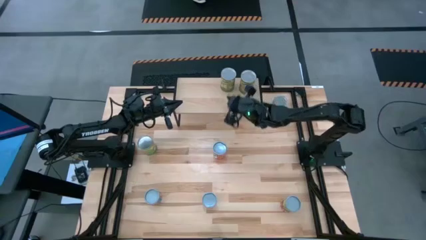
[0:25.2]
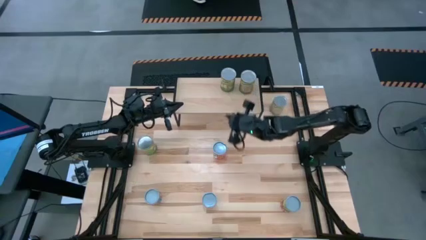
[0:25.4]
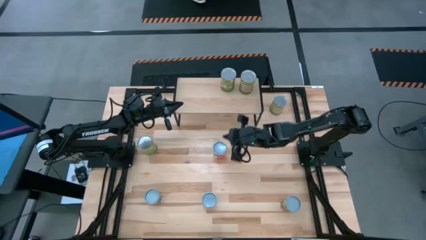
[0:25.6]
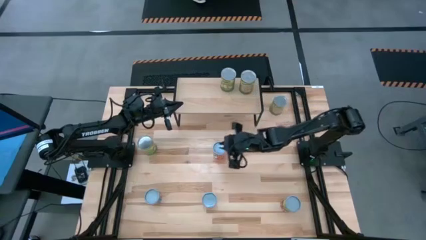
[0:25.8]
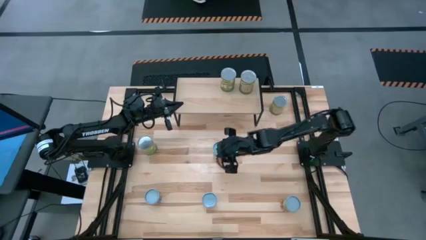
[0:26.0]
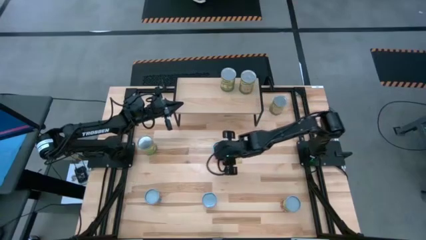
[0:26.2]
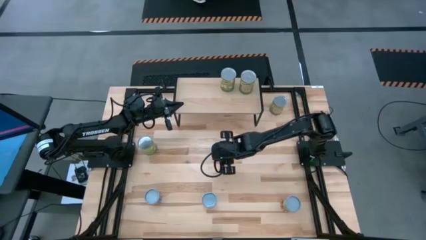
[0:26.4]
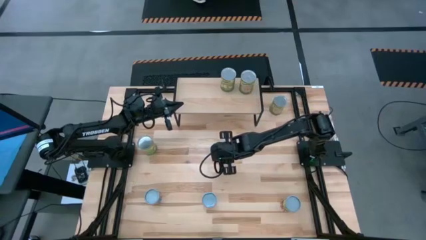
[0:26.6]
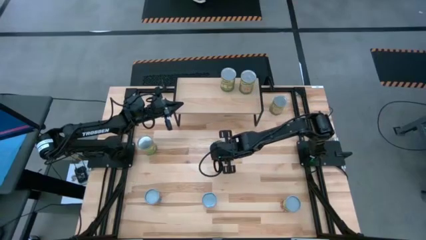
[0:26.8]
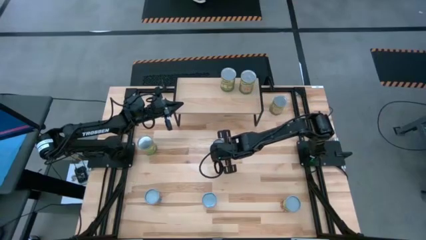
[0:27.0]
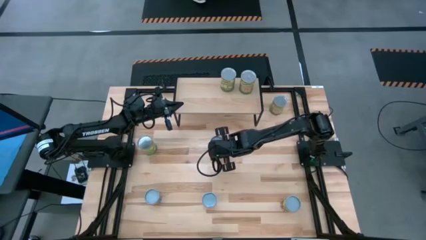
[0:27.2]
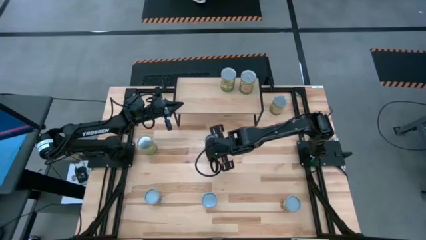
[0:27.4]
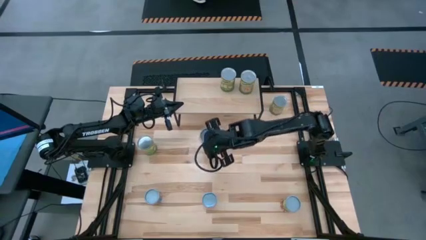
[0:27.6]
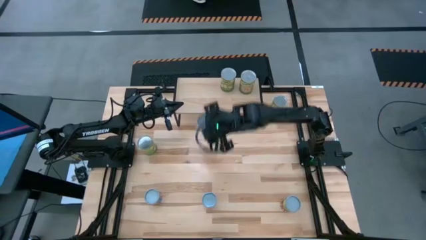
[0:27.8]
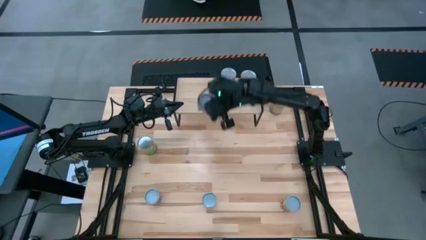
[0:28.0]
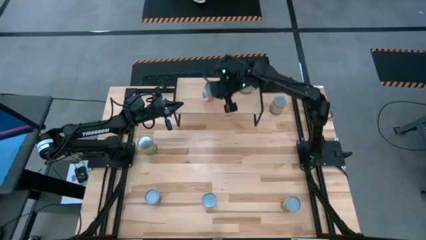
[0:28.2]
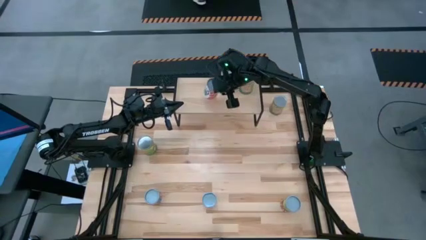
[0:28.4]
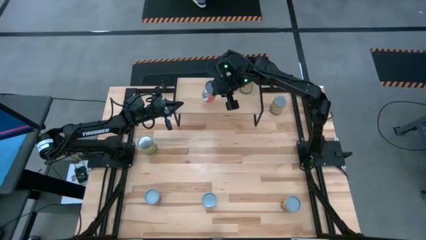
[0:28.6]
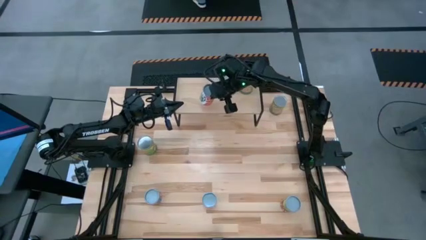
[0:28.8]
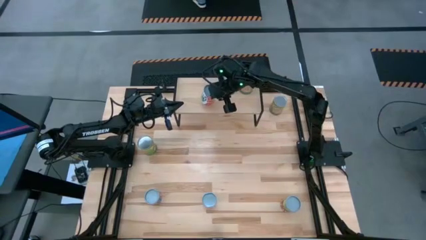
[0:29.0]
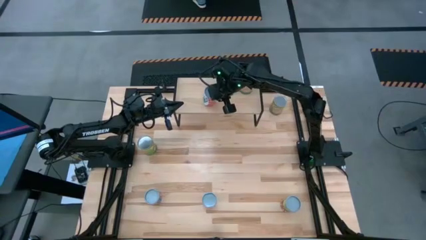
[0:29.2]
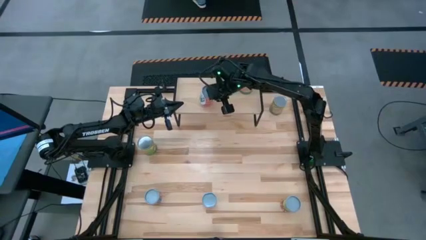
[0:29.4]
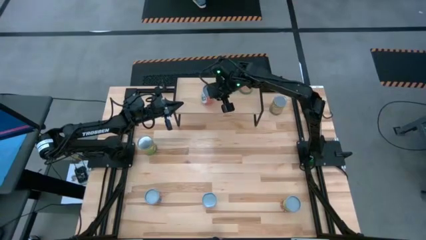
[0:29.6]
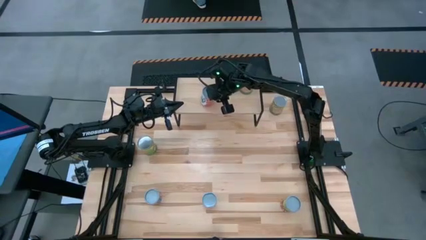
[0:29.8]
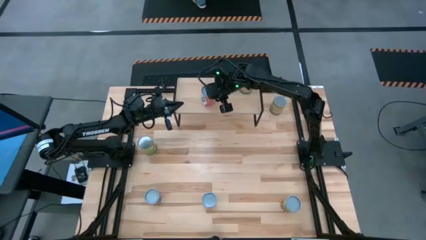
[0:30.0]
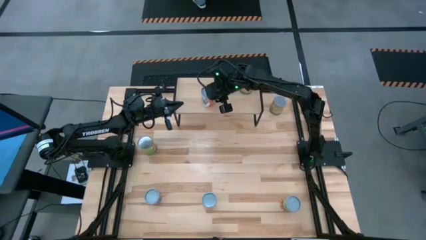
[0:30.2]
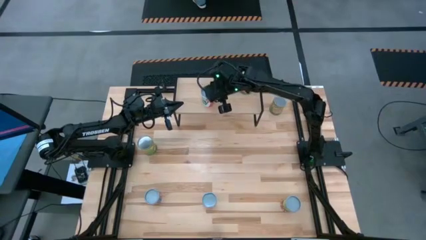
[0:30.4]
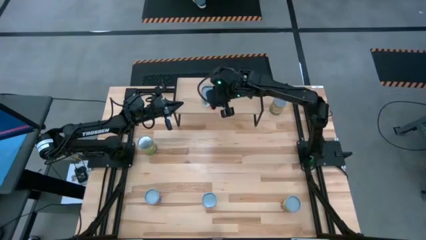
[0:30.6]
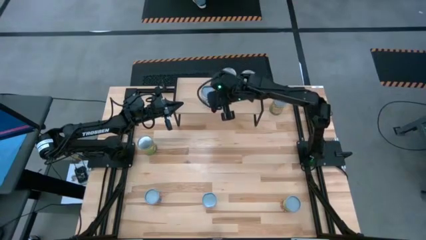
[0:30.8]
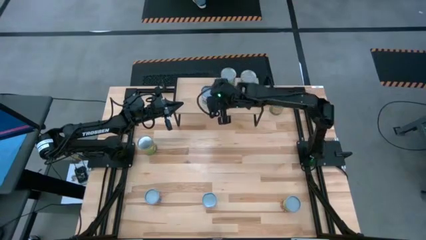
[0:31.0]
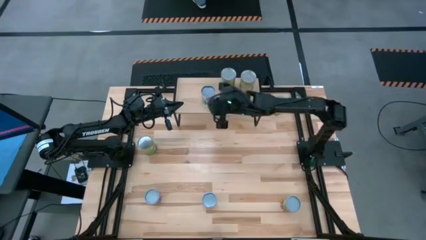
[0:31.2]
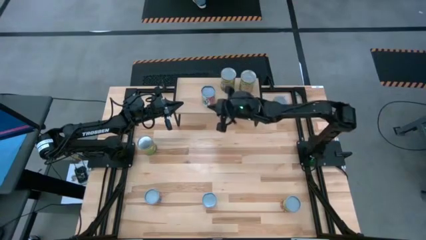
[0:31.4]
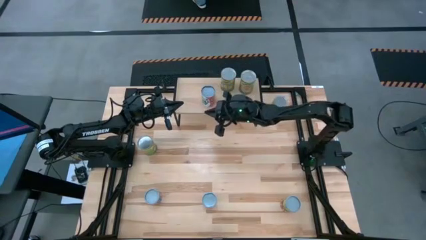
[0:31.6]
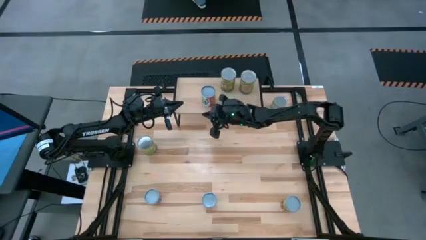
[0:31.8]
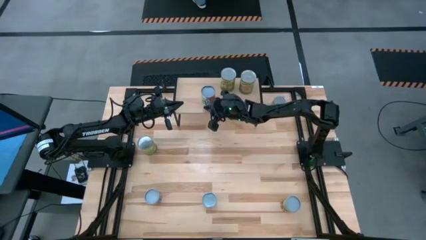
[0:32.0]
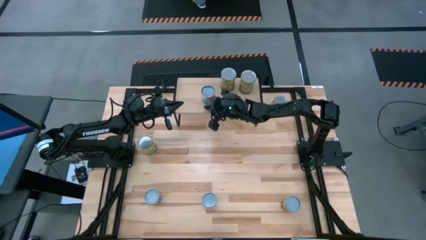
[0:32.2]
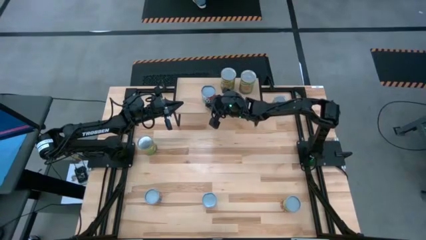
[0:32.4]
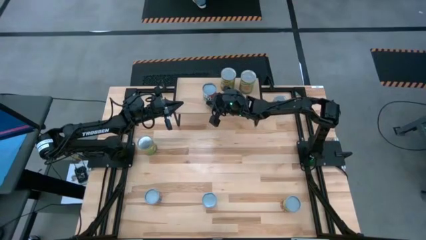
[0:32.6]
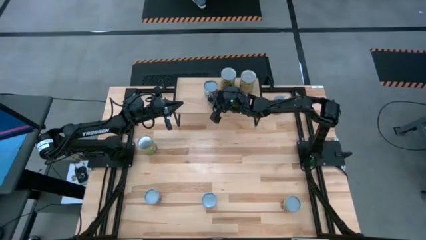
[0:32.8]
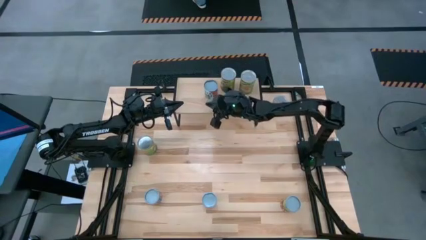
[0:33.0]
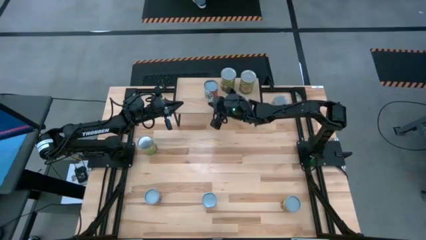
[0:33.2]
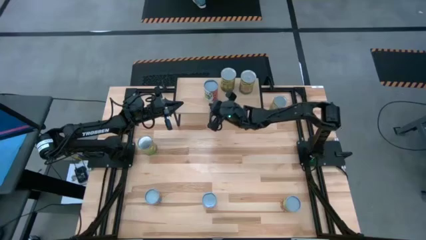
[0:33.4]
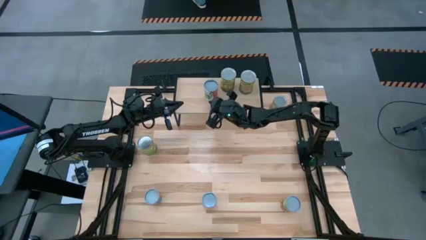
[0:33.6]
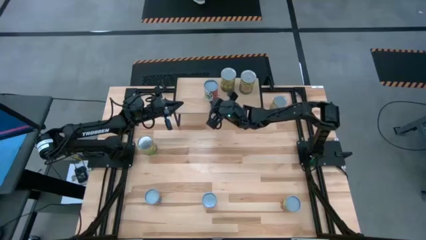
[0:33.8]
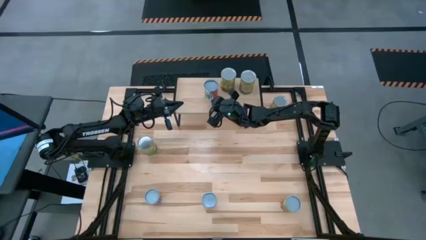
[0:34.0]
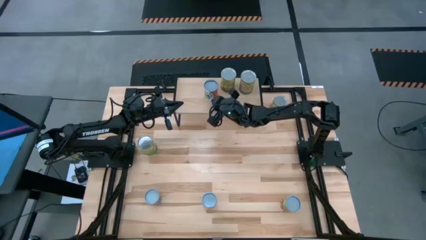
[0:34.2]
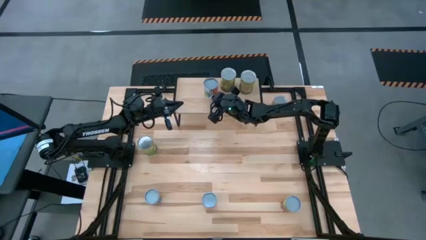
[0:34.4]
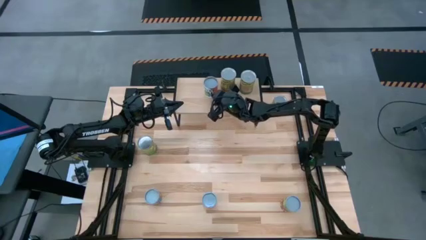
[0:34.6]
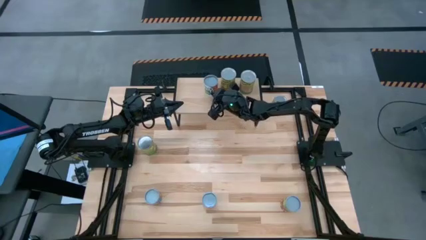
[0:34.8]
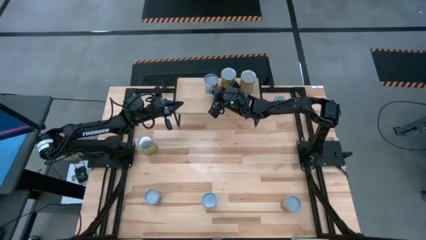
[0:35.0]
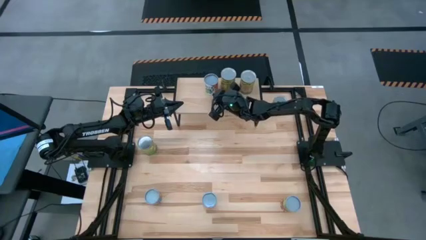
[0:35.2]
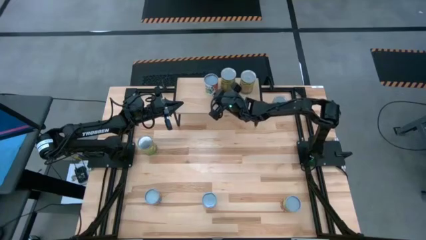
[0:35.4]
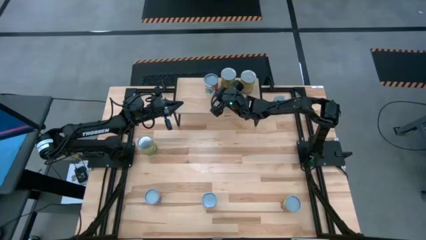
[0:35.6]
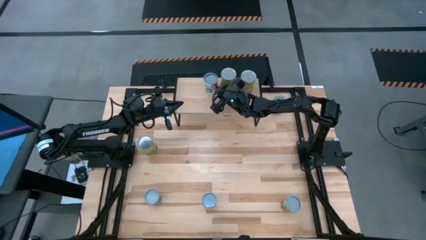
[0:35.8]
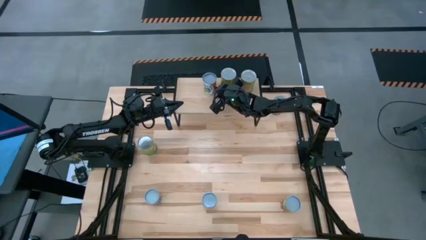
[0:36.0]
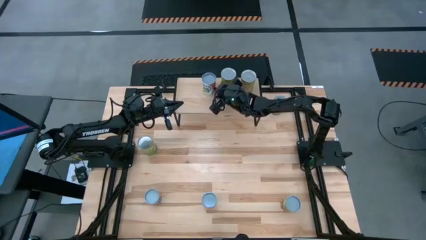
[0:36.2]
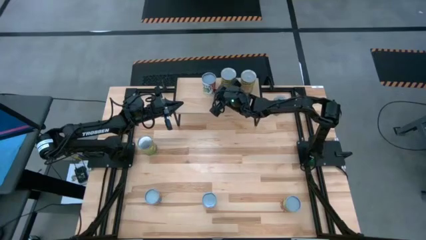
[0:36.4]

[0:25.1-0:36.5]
Task: Pick and place cans onto a shelf
Put the canned mixed fruits on the shelf
